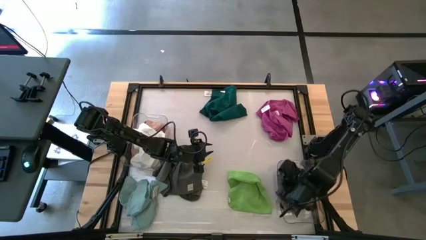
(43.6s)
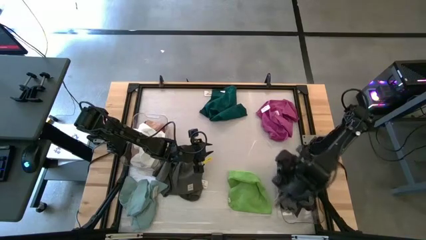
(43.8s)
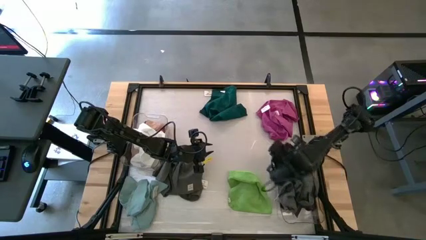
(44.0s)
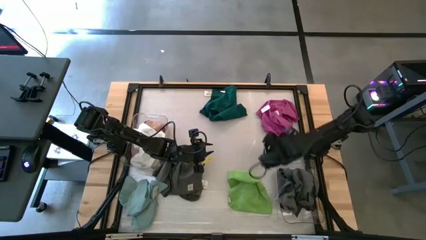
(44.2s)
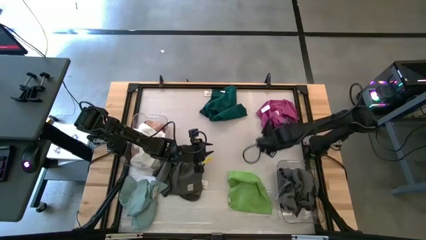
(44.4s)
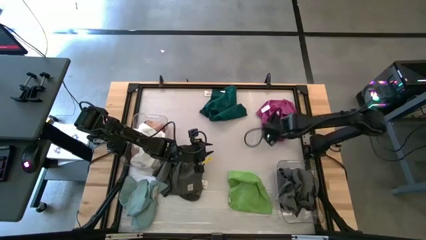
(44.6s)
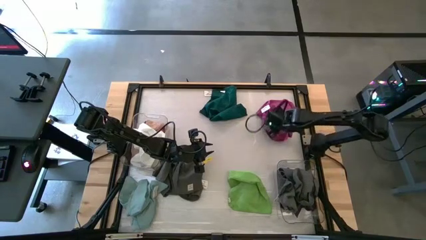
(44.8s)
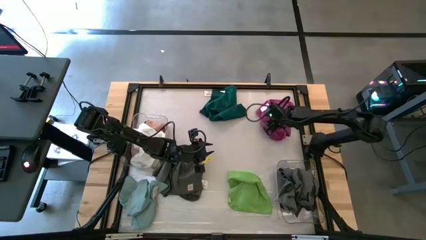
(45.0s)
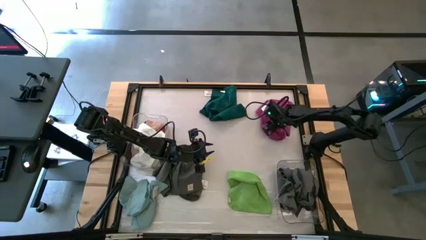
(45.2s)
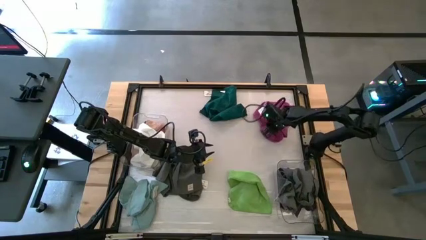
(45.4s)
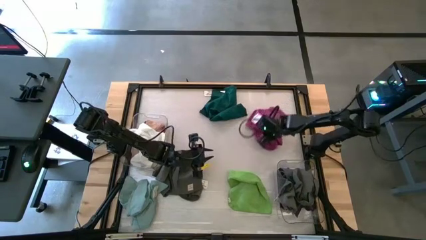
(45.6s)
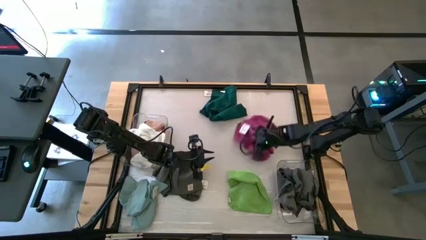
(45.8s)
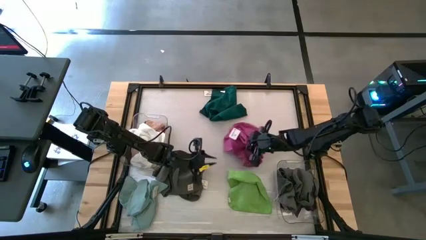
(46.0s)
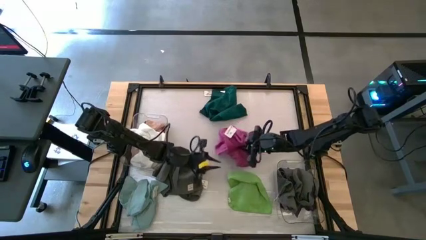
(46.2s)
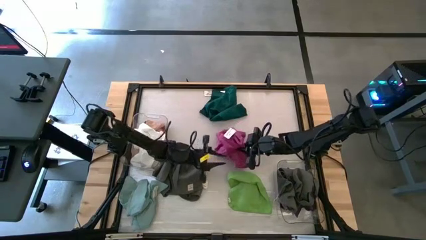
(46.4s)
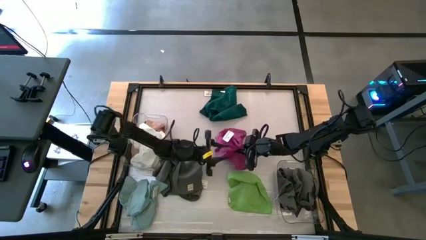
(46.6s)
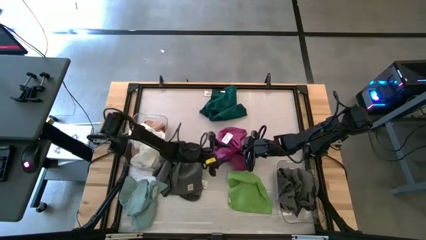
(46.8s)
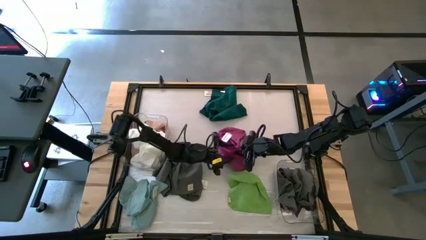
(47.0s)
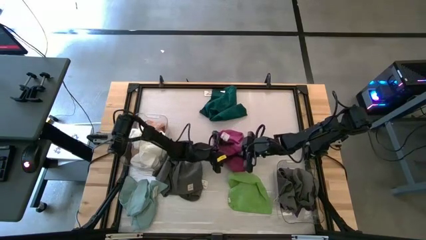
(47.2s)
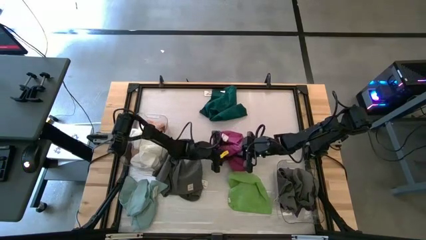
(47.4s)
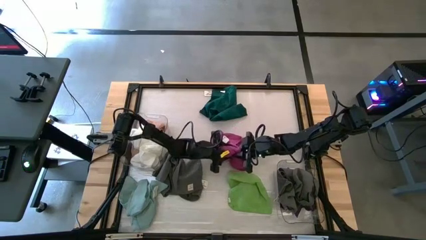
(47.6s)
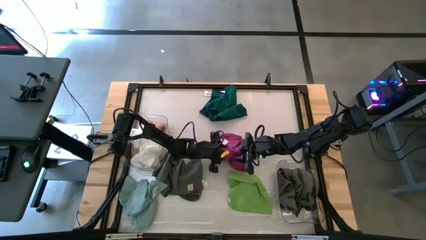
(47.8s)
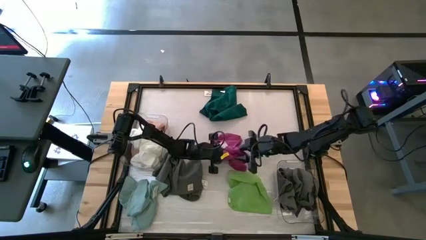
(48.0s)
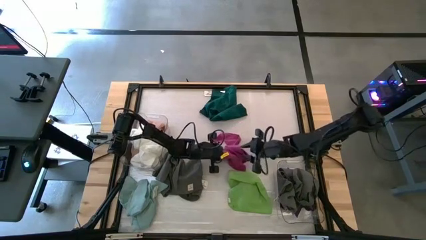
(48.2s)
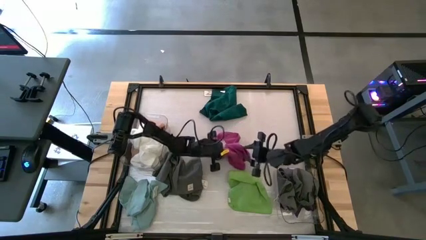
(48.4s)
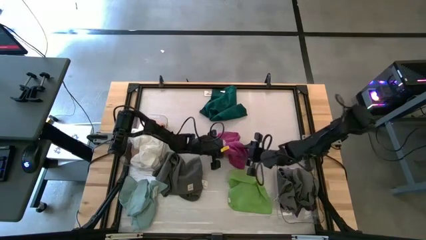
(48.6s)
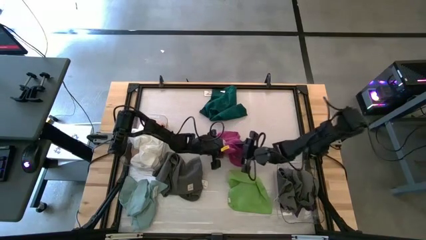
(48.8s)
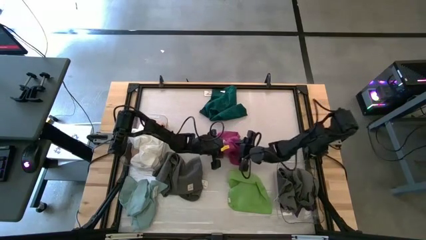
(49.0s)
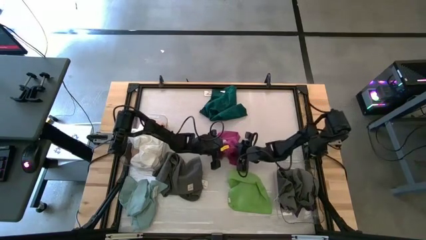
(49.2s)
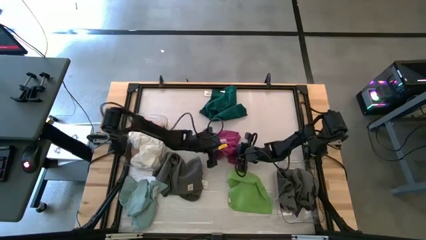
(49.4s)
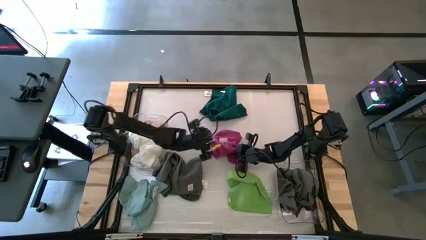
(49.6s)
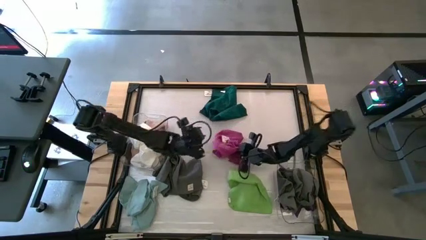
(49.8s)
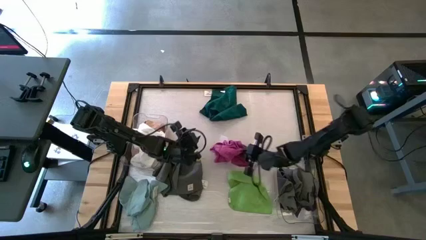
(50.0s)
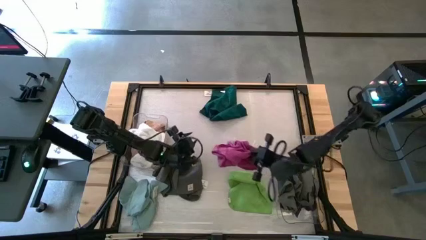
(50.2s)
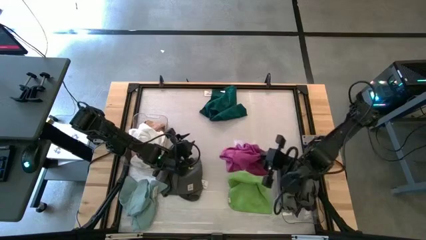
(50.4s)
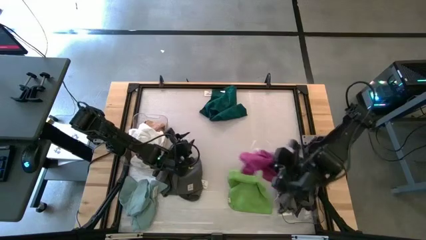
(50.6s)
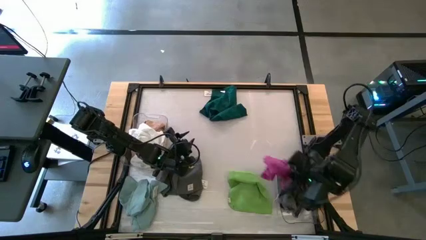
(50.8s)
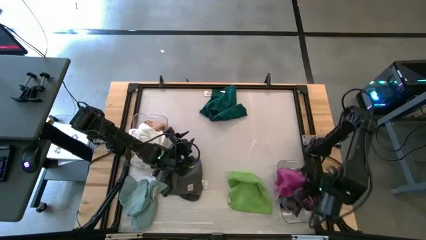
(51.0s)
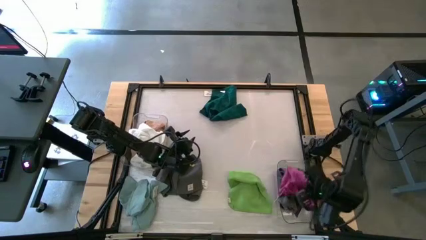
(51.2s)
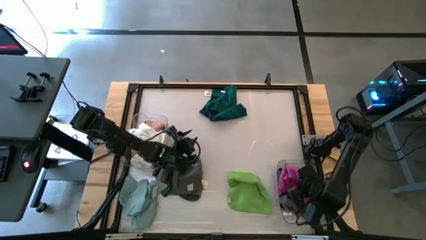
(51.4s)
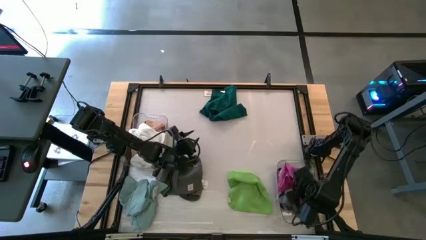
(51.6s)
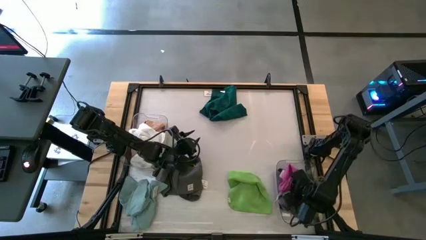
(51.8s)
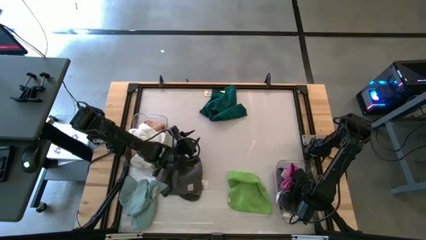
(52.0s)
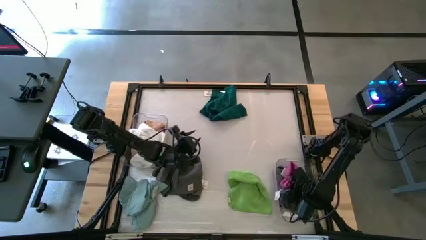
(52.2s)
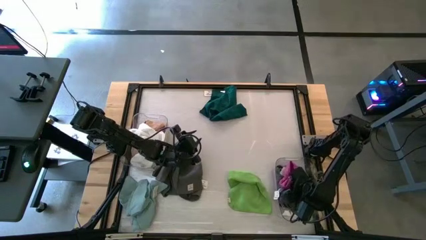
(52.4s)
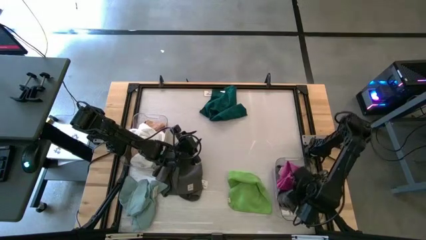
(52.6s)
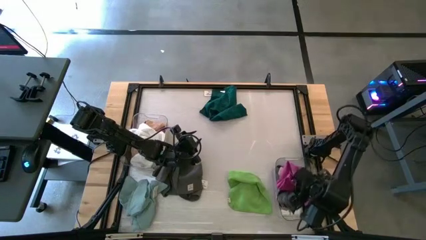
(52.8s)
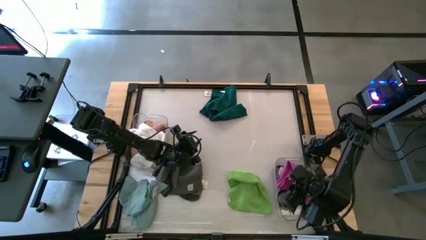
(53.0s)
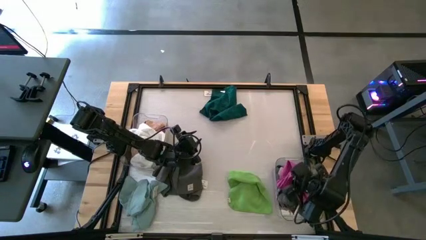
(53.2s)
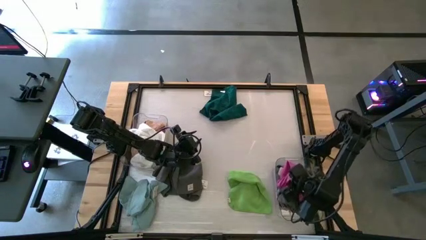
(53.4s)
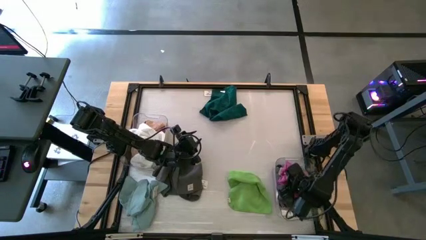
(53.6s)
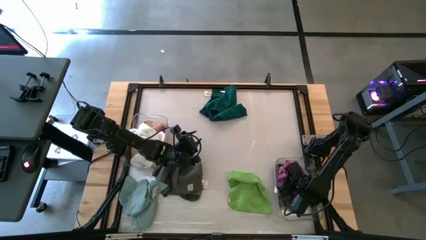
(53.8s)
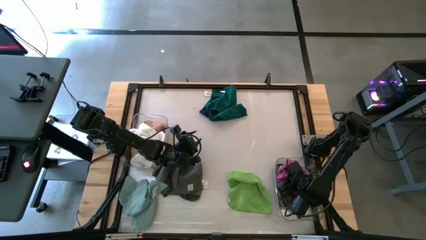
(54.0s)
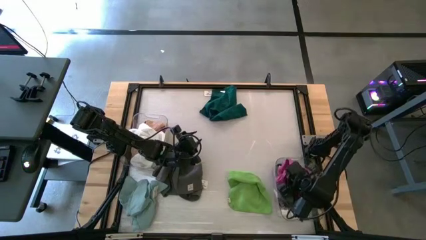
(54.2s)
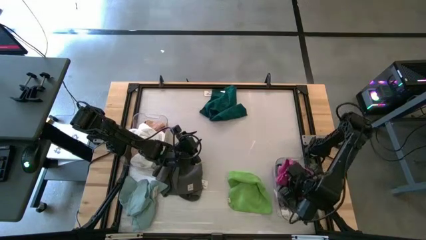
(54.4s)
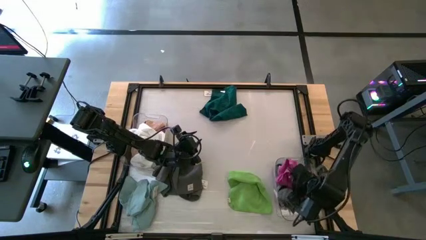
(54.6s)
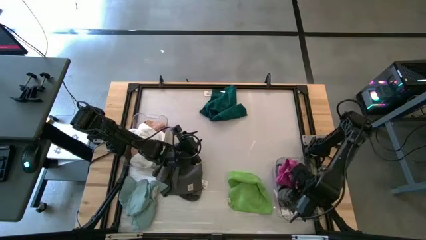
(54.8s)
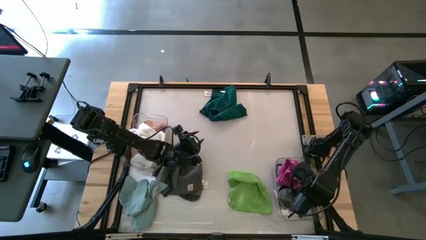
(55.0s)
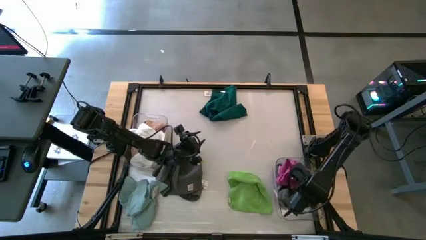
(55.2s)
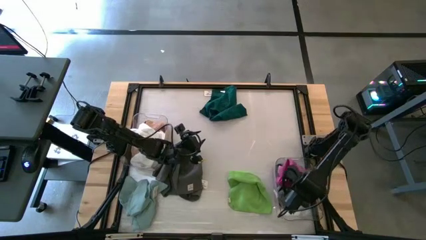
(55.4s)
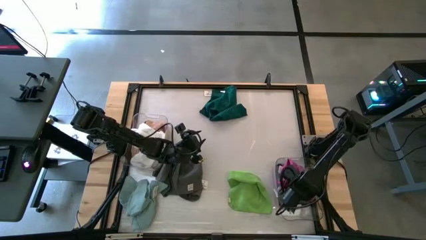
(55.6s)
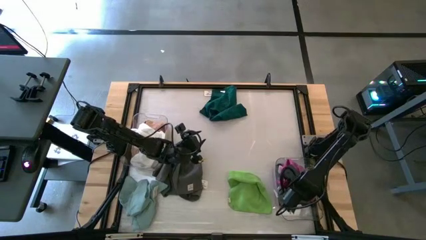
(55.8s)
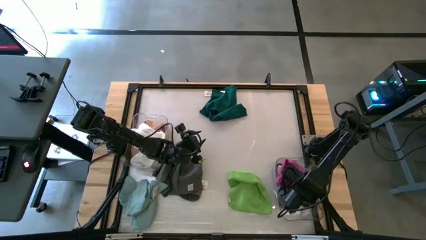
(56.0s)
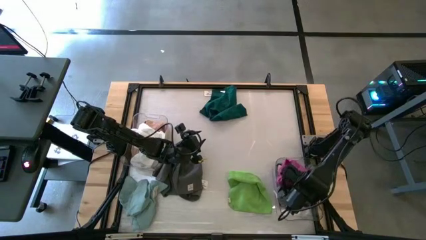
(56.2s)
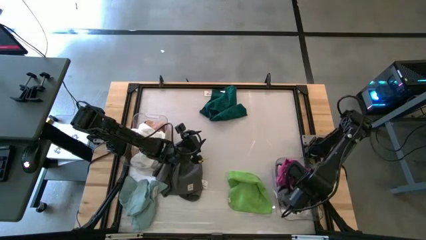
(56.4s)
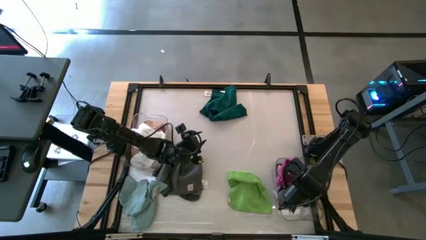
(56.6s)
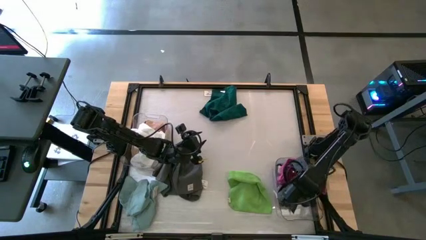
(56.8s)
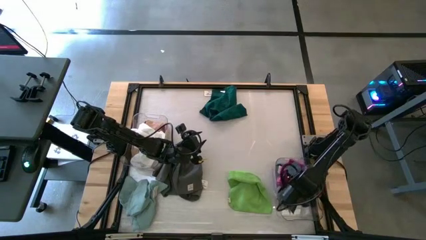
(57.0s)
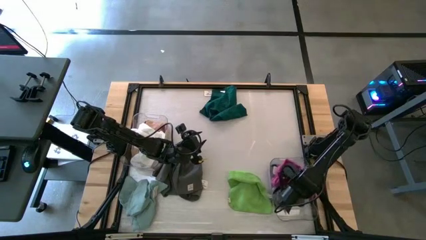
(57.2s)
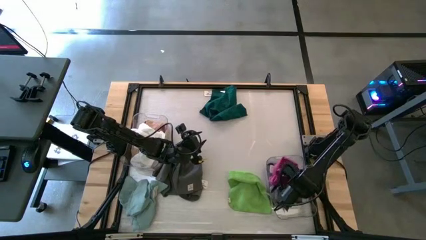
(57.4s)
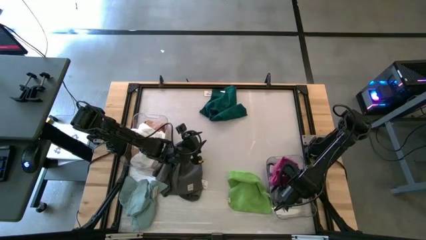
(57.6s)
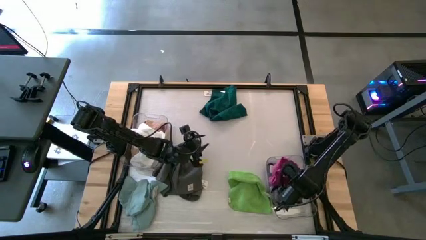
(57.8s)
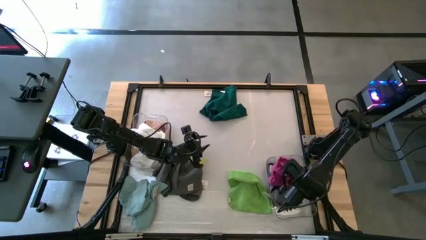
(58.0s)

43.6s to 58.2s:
Task: Sort towels by color in basket
Put the pink towel into the right transparent bin
